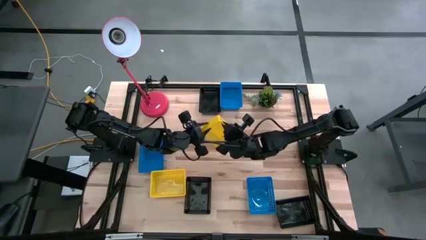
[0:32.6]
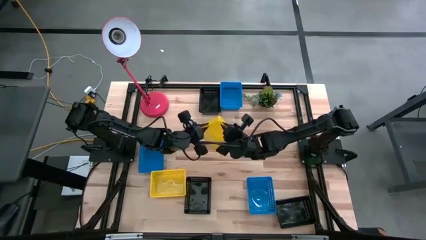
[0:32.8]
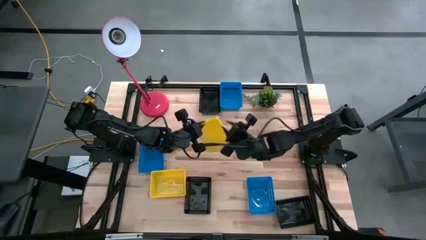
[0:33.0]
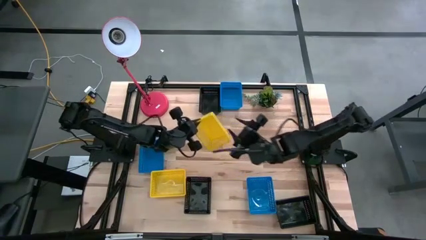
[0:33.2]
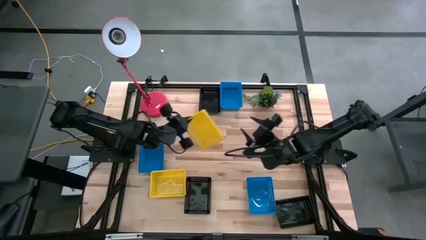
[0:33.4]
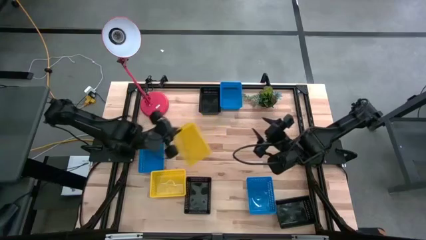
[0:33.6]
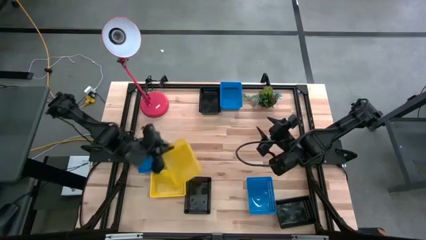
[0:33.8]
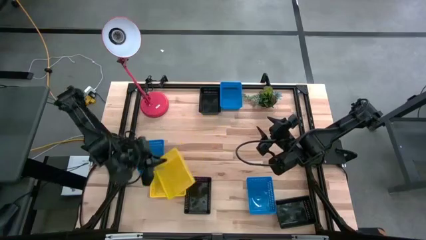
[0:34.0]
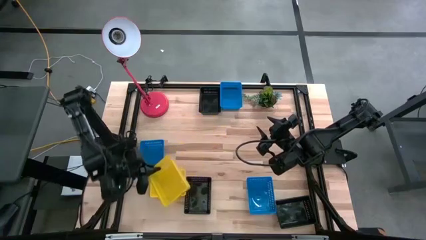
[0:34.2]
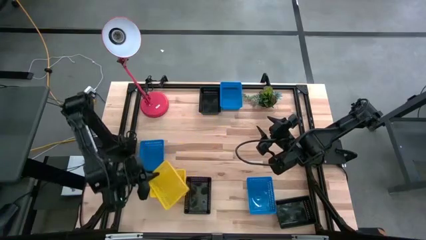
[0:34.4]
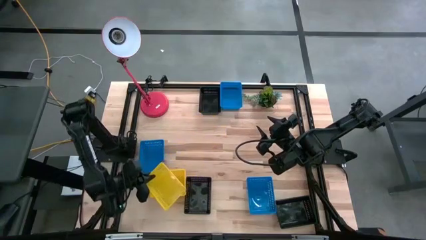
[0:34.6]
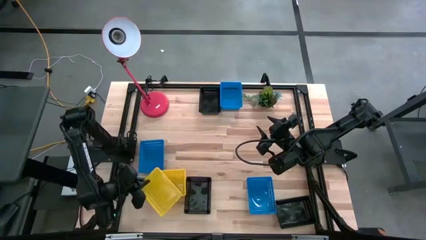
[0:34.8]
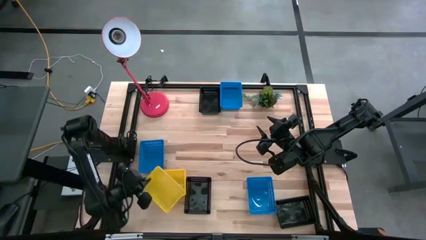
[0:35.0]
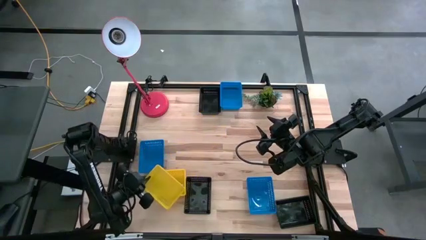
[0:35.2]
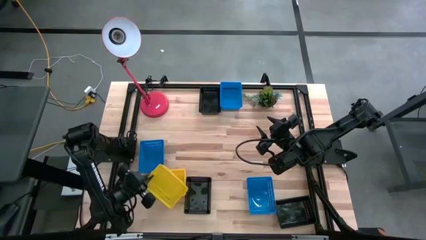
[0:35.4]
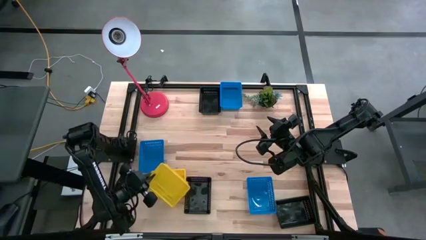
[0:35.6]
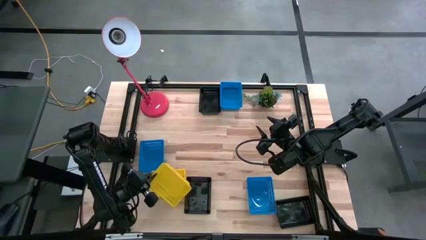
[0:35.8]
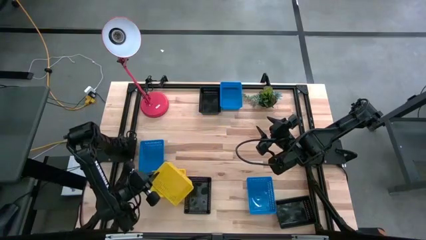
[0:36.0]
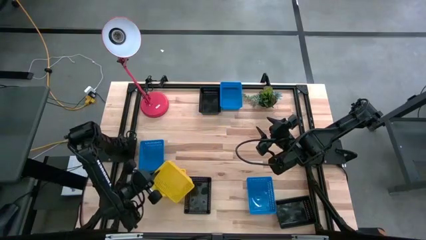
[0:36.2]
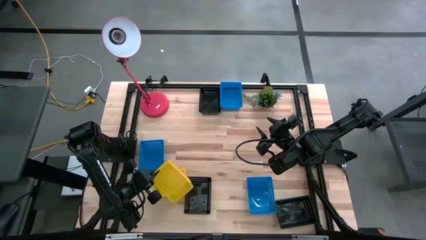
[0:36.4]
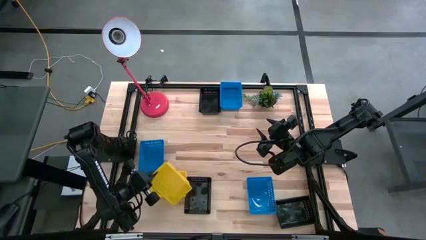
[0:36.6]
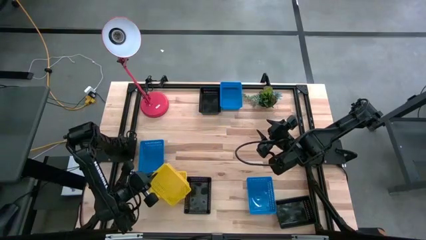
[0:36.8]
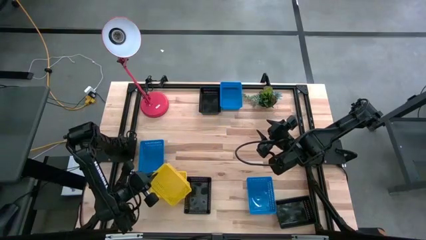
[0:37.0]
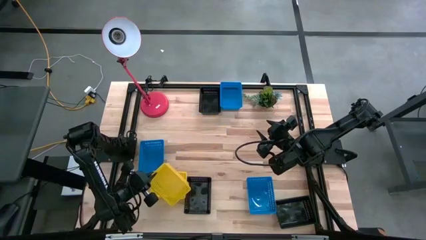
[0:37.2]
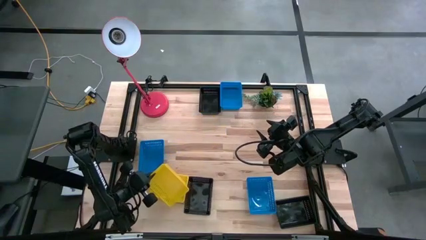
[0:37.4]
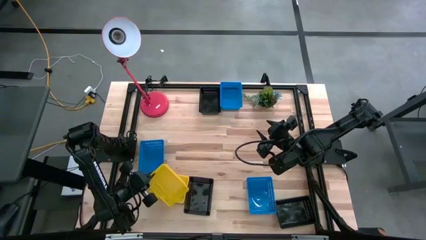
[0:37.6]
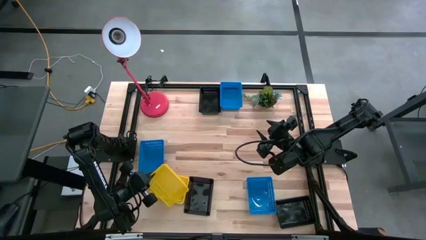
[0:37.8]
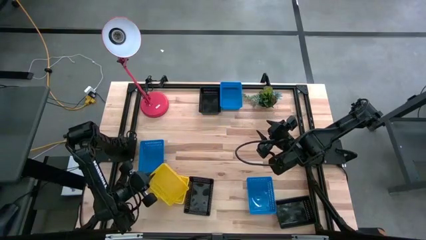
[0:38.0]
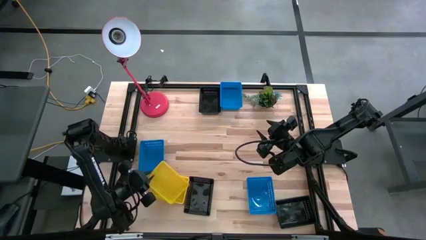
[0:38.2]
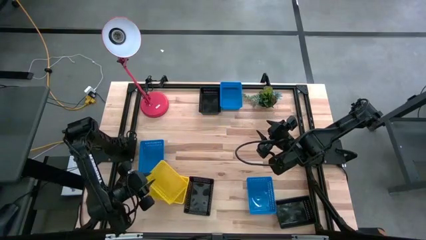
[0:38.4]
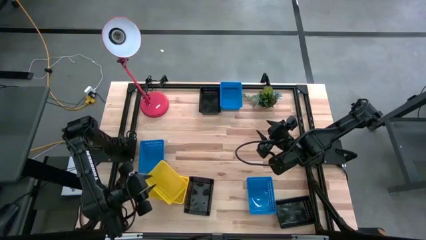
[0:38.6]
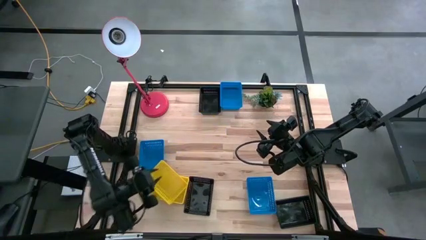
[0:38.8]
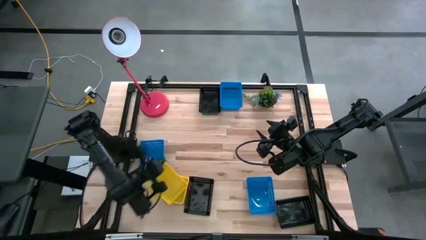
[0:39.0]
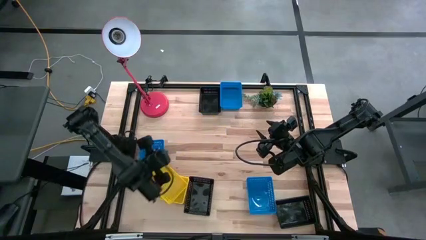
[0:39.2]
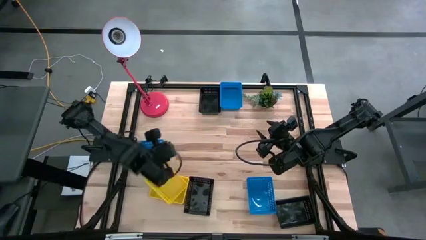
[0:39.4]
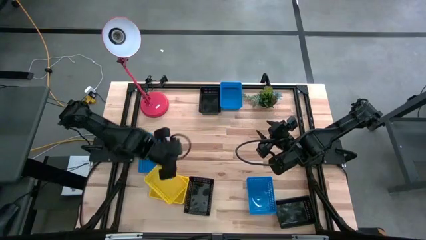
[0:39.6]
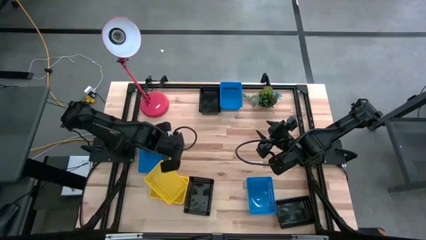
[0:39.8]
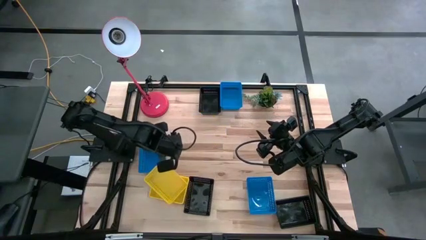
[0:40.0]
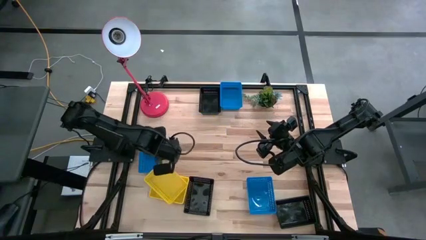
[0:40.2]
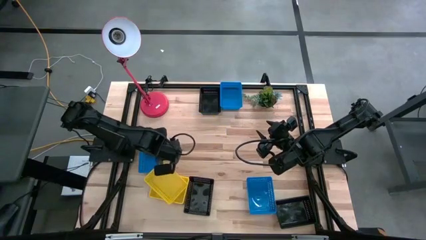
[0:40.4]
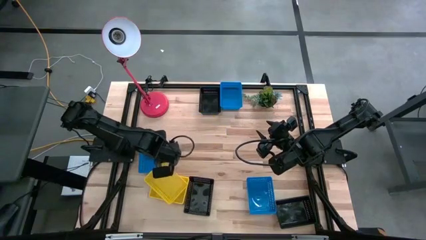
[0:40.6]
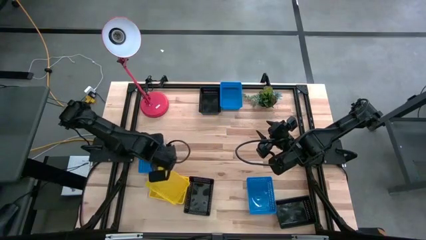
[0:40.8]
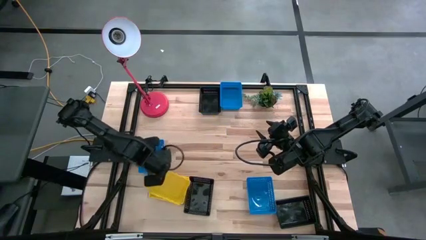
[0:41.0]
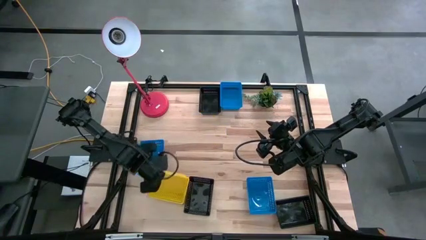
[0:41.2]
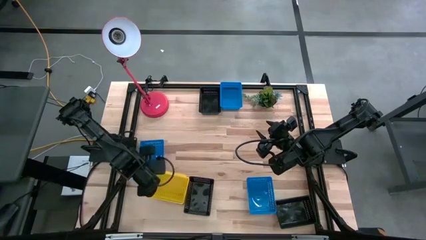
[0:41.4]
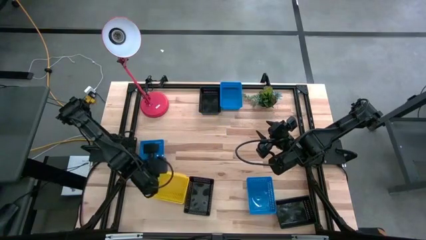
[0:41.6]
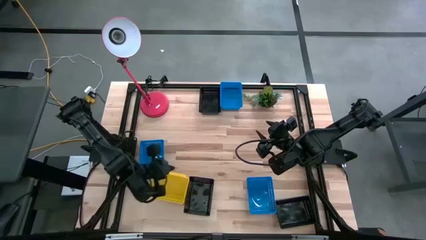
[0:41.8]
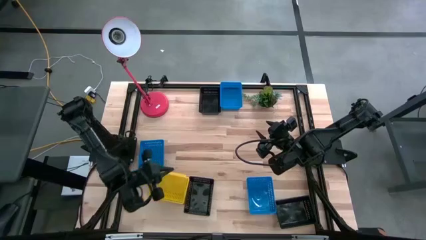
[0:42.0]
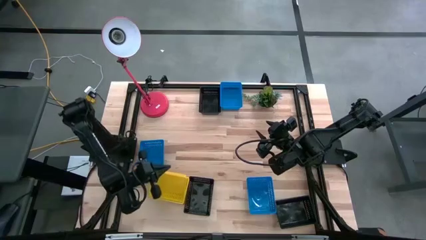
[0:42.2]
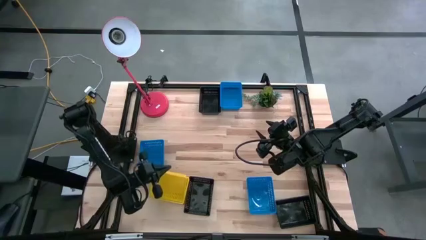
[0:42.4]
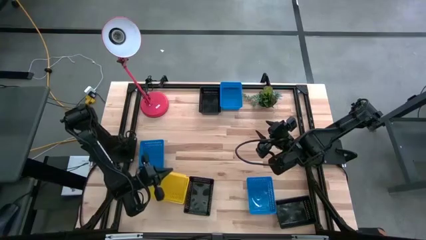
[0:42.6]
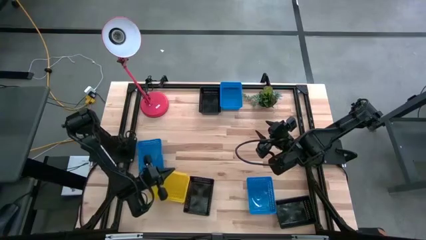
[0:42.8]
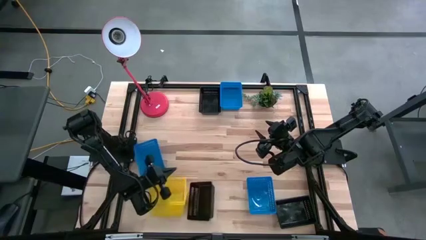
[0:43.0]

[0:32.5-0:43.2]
Stack the right yellow bin on the left stacked yellow bins

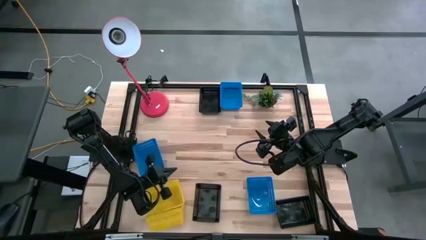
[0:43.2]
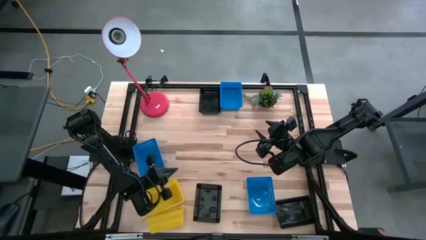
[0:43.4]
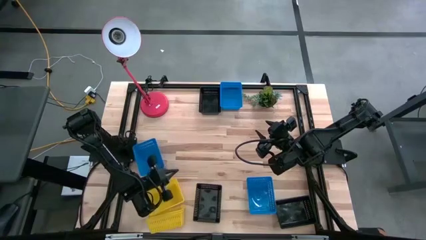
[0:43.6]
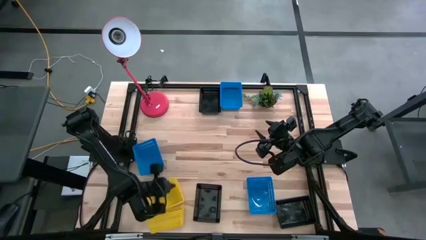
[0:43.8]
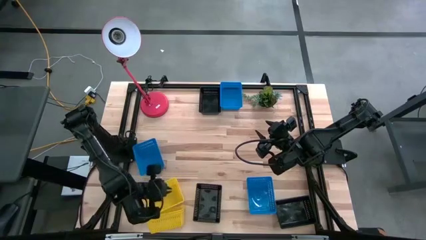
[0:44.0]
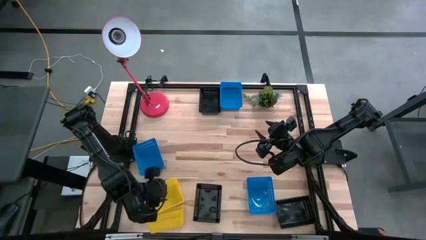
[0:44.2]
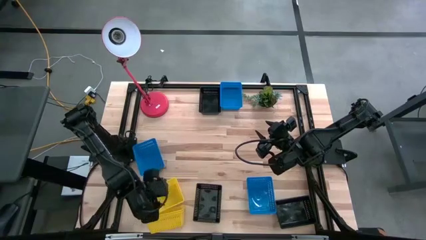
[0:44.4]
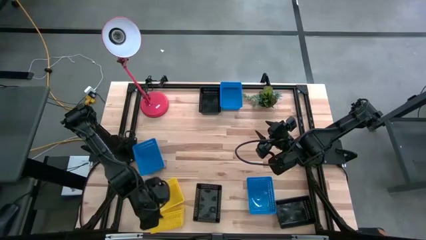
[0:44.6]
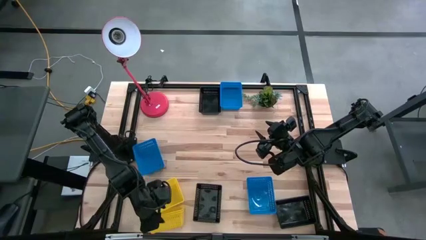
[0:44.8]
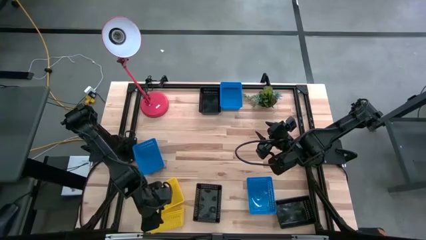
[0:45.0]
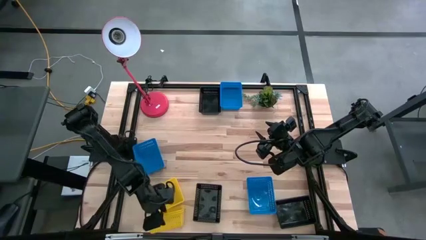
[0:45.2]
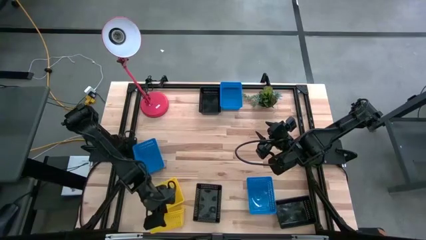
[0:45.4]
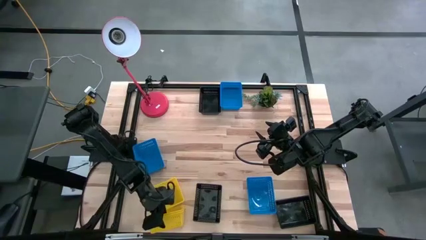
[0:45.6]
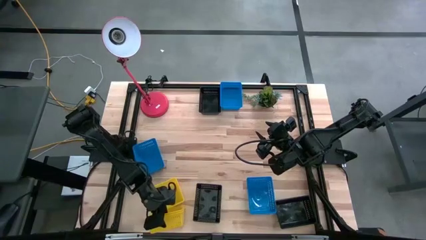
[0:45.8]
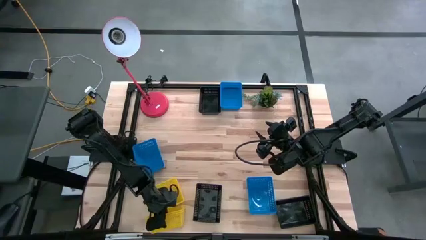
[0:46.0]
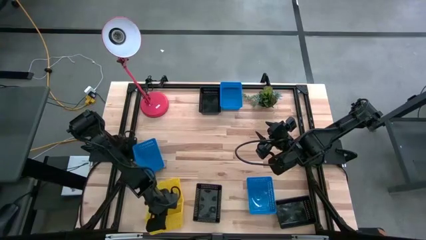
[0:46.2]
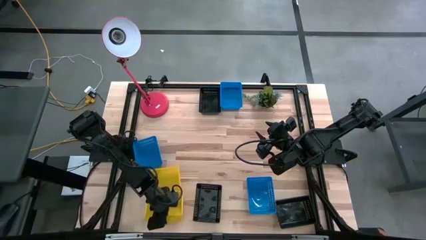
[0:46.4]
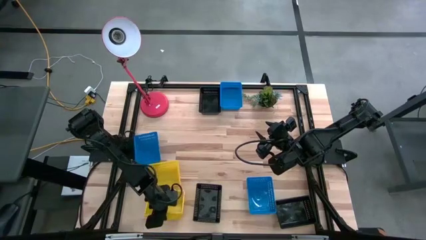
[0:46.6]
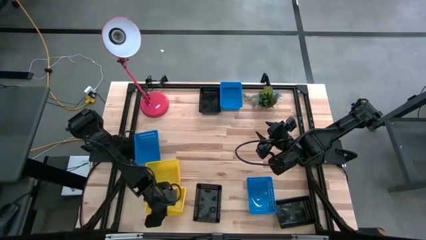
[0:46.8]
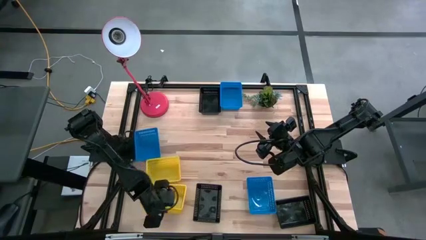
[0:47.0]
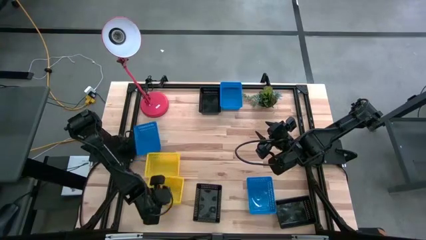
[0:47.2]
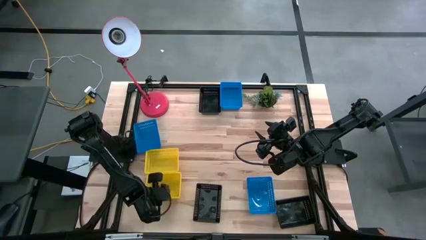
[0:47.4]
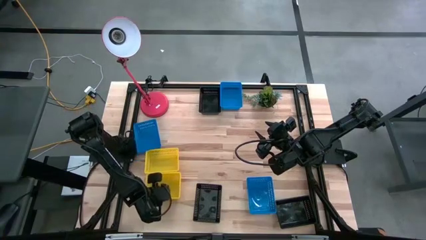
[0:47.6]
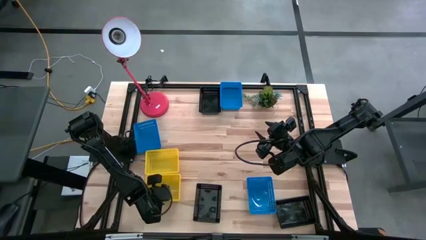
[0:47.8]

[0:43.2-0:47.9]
Adjust the stacked yellow bins
